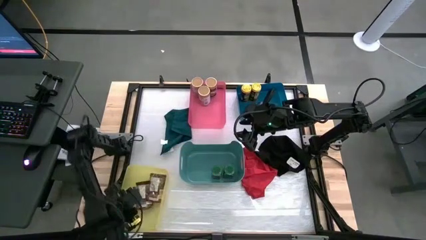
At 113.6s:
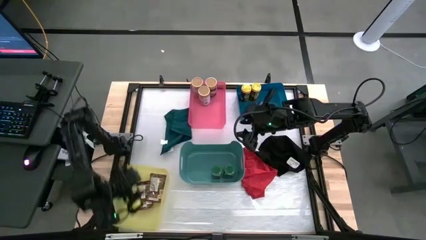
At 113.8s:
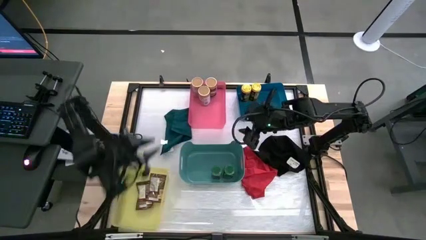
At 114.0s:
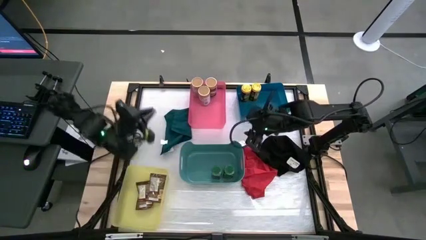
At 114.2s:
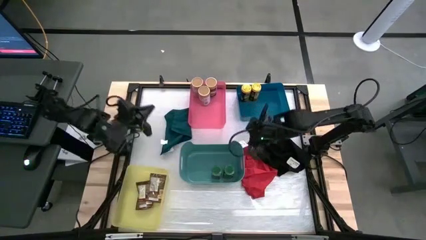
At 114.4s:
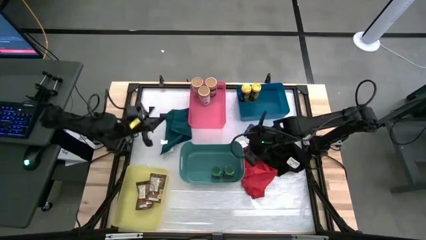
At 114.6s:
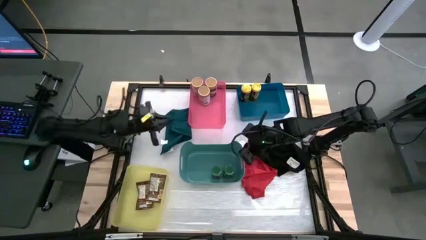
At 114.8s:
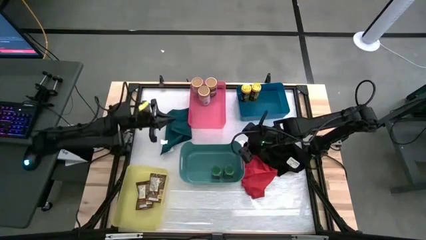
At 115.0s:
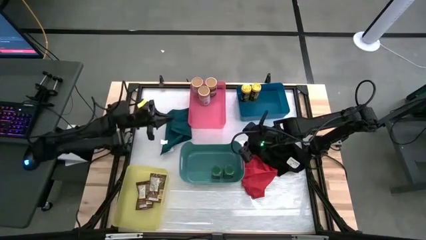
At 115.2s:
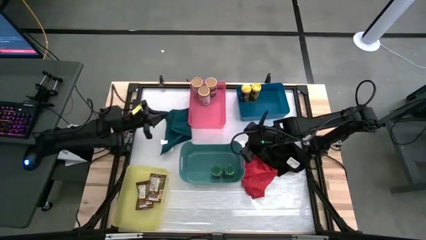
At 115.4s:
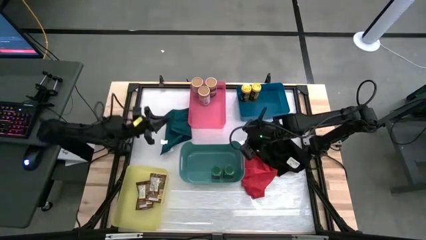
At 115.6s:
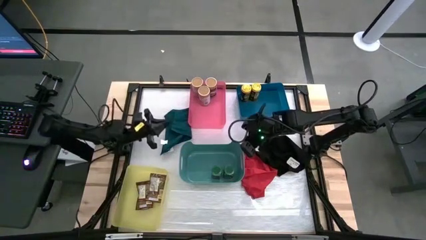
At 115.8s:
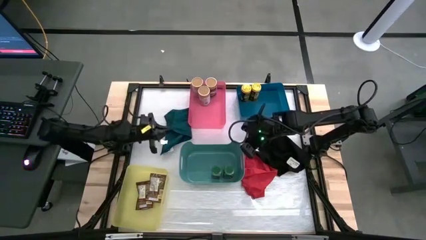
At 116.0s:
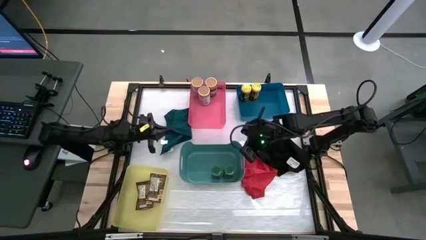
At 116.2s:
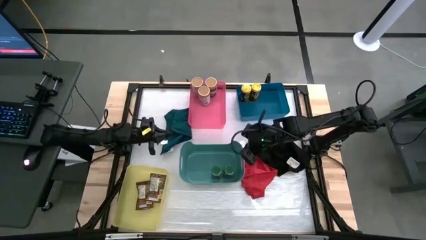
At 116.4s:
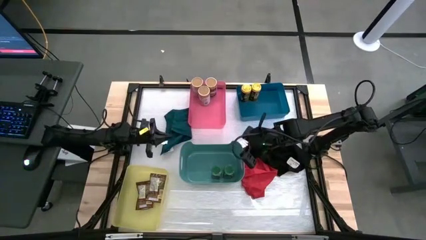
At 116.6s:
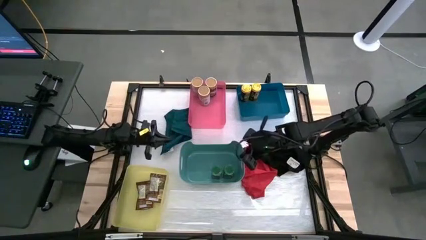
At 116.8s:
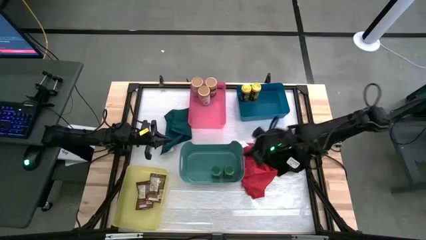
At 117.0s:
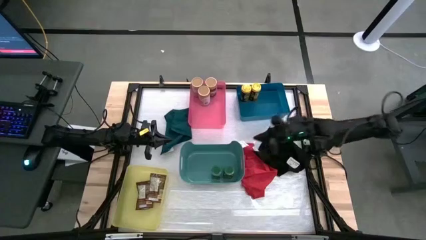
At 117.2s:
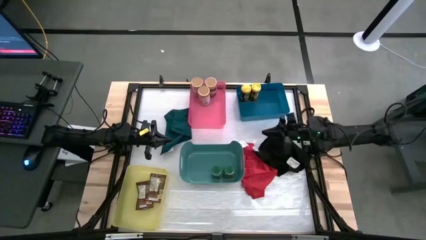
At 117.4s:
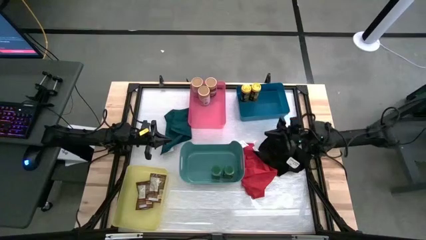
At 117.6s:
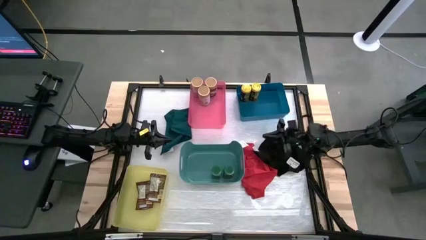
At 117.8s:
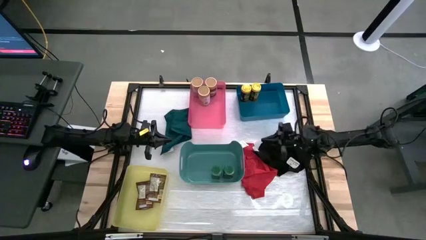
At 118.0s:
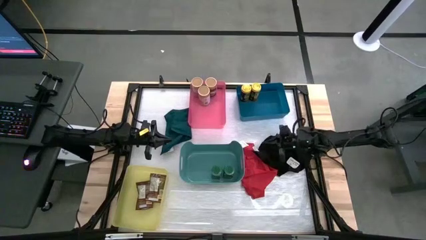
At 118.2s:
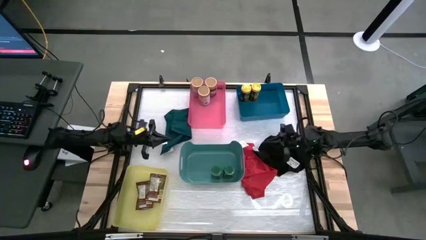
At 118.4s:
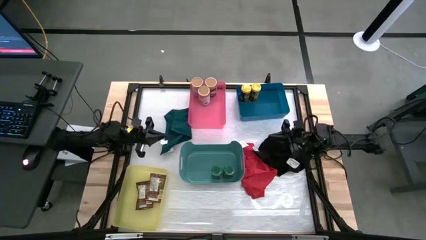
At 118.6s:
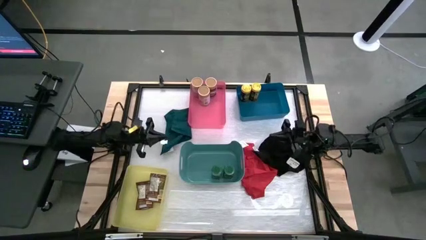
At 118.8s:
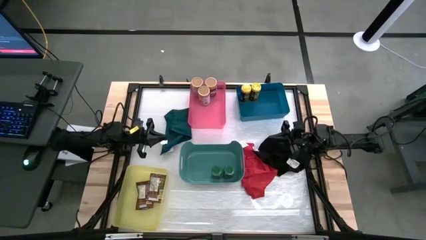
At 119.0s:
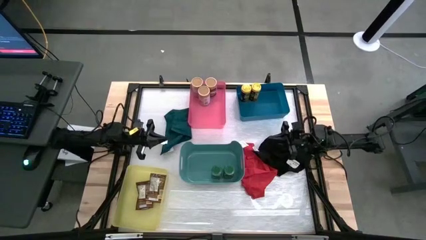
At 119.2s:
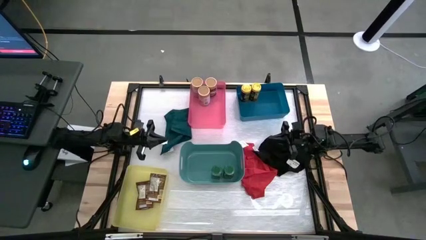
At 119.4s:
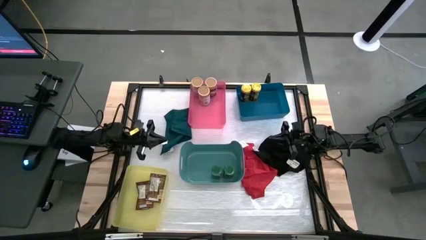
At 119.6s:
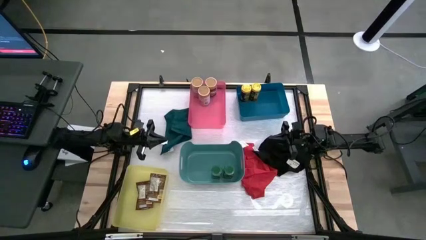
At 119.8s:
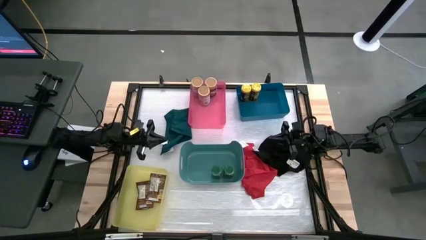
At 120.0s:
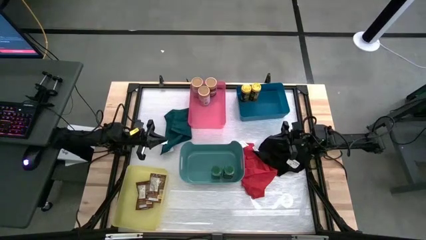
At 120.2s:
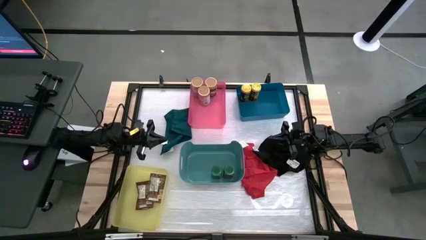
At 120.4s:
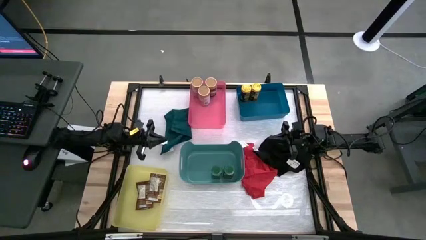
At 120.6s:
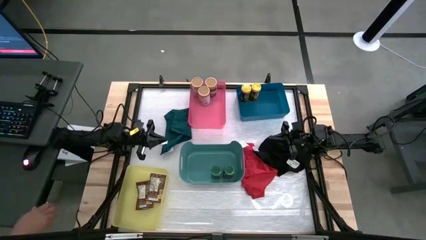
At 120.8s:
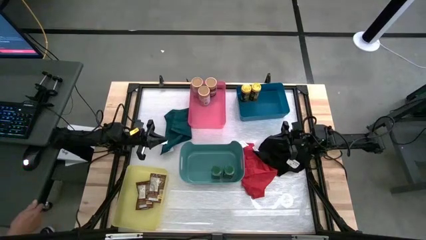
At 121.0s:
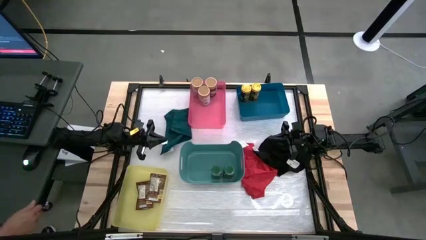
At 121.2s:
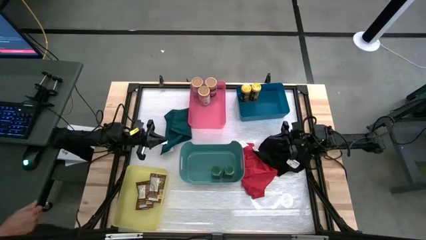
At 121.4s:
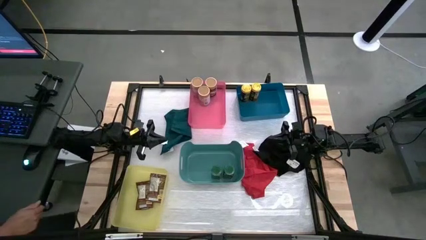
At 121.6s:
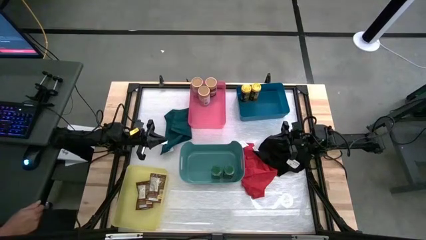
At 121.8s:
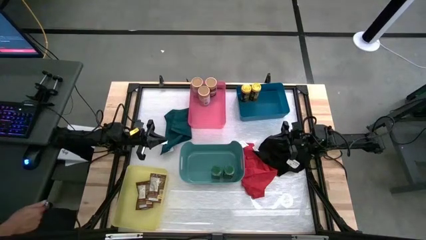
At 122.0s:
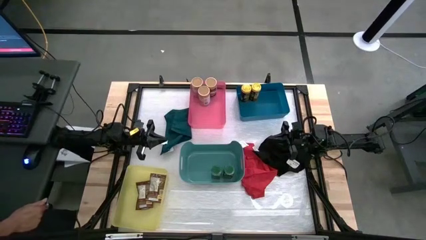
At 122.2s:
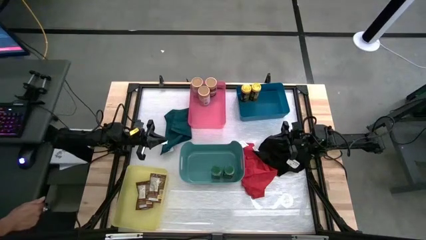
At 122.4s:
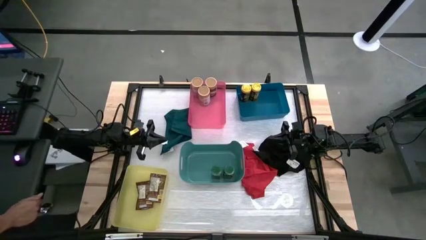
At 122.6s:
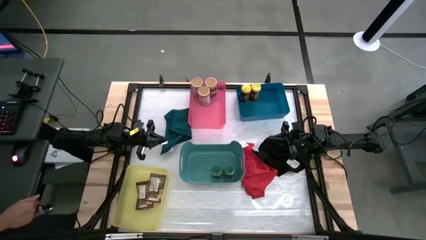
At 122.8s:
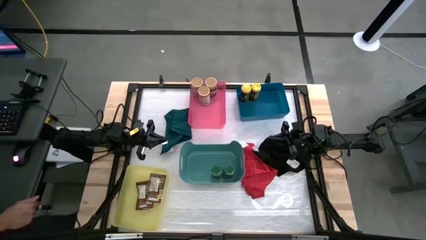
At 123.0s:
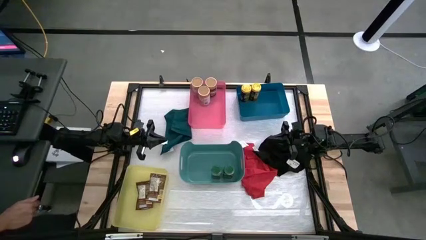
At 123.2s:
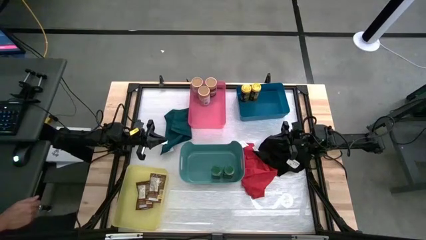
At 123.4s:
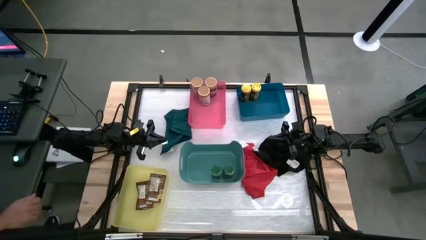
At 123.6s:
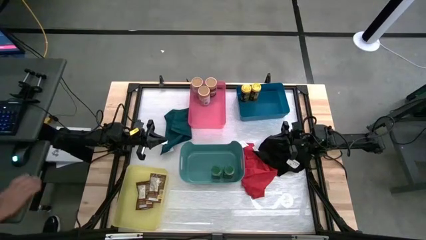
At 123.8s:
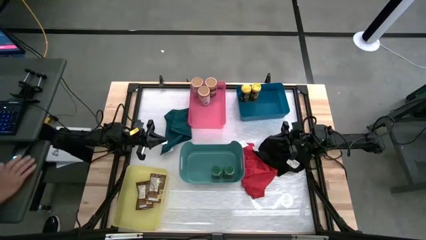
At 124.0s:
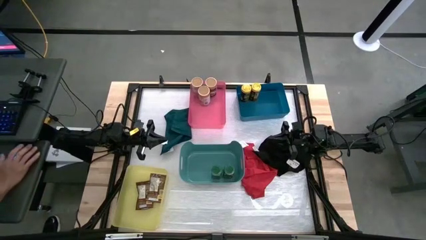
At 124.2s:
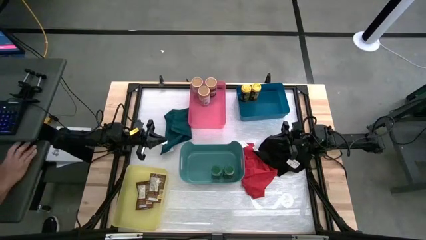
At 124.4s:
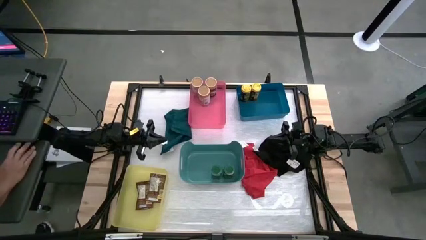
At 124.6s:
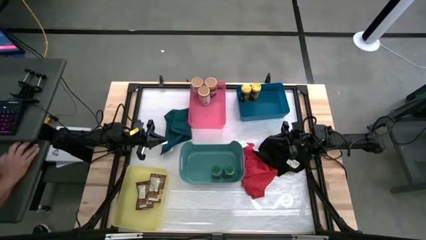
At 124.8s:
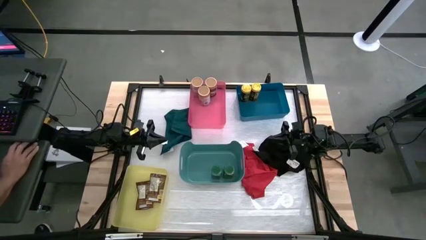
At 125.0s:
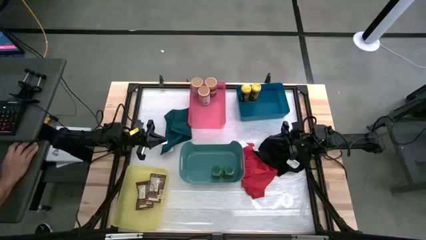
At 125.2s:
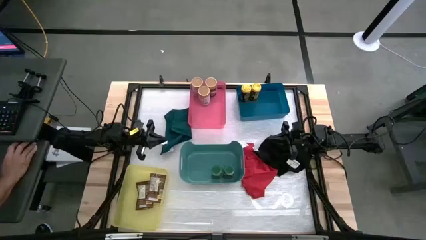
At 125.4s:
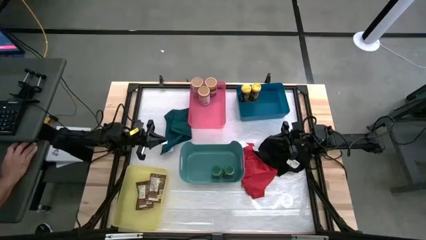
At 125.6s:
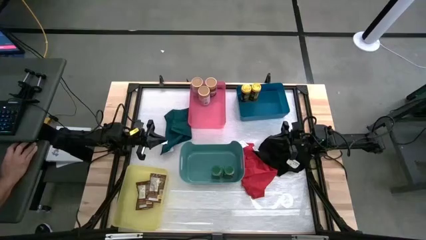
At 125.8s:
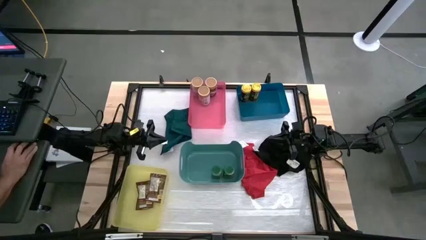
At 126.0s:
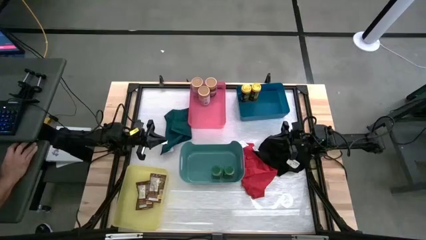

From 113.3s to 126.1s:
Task: Sort spices by type
Return to Home Position

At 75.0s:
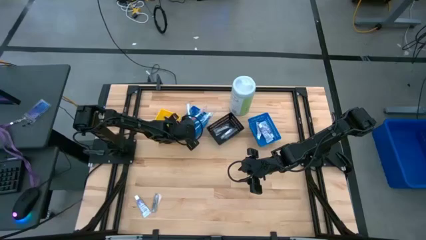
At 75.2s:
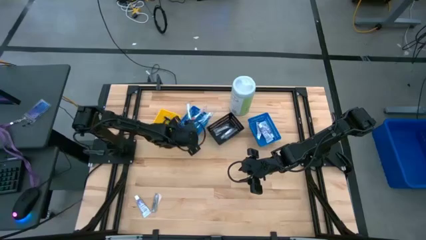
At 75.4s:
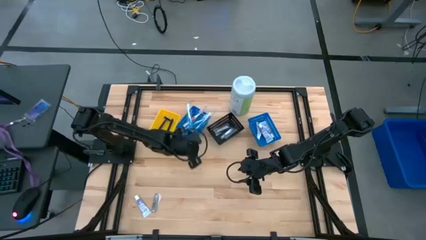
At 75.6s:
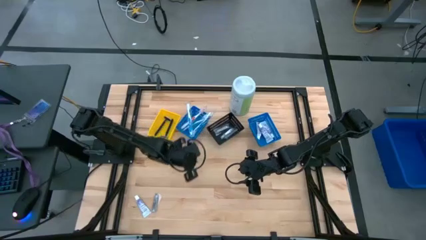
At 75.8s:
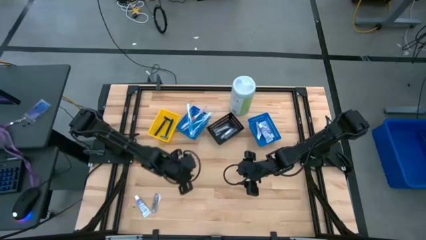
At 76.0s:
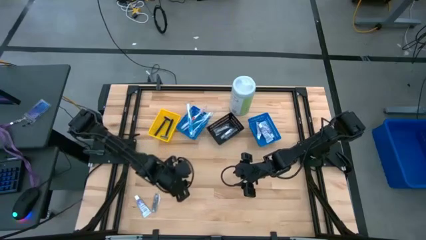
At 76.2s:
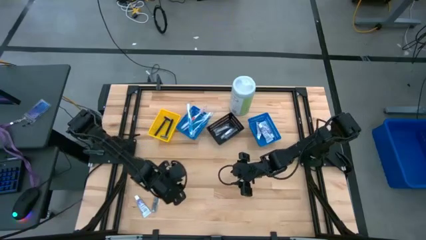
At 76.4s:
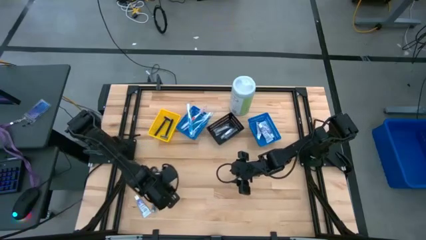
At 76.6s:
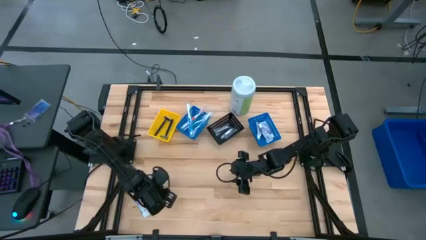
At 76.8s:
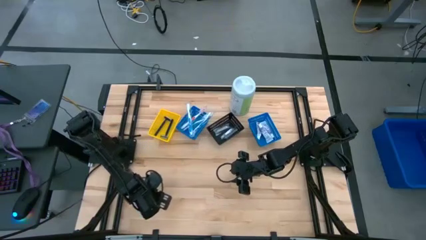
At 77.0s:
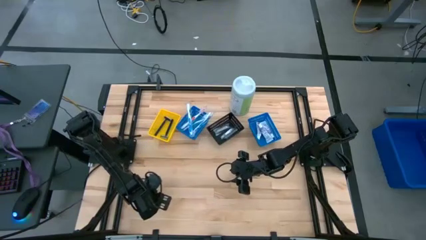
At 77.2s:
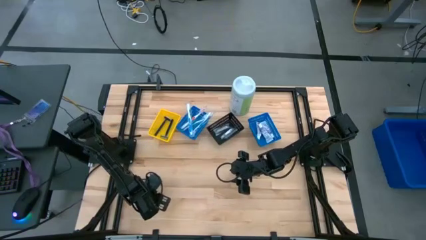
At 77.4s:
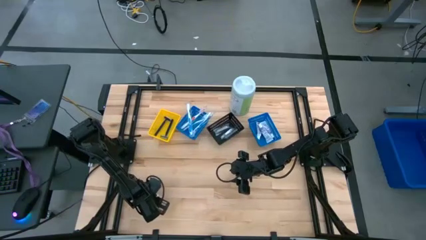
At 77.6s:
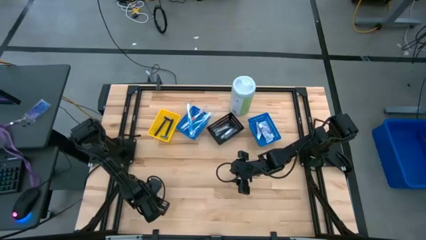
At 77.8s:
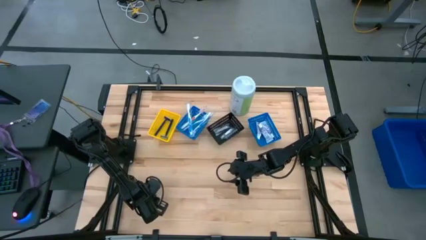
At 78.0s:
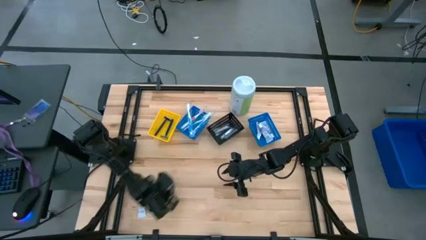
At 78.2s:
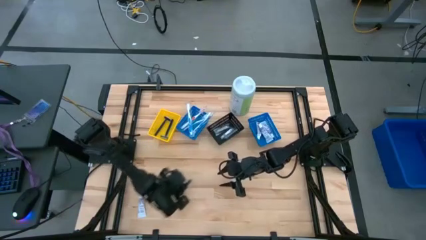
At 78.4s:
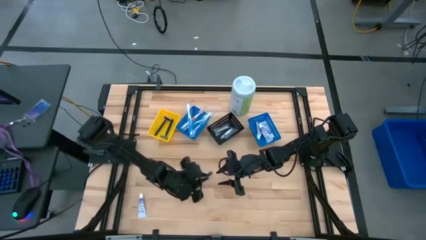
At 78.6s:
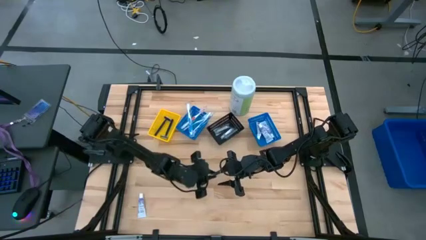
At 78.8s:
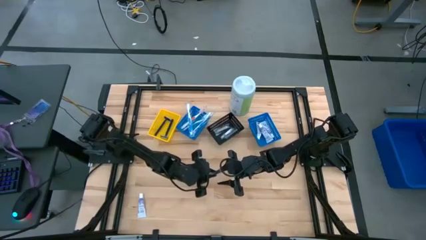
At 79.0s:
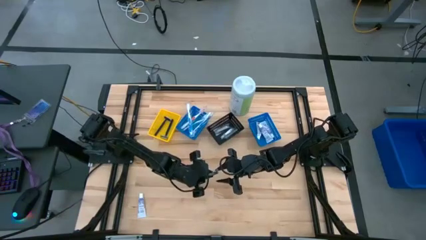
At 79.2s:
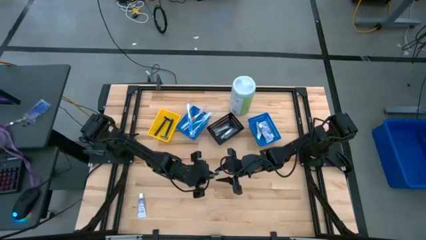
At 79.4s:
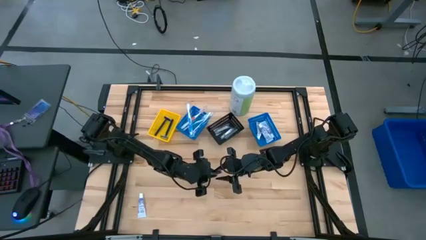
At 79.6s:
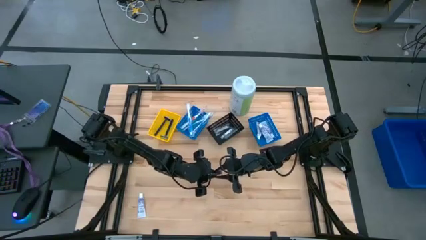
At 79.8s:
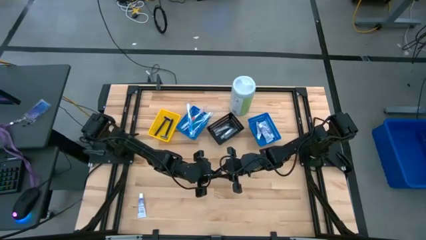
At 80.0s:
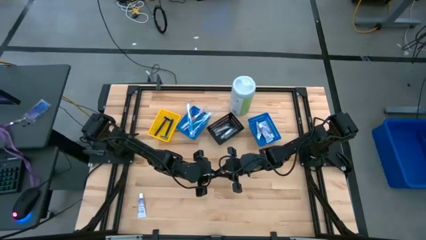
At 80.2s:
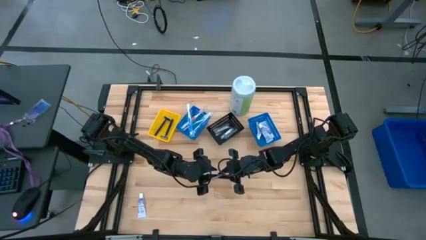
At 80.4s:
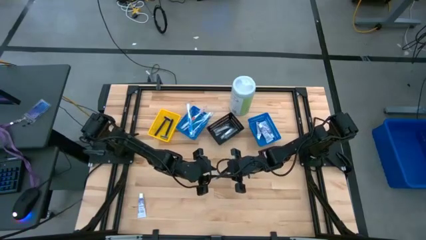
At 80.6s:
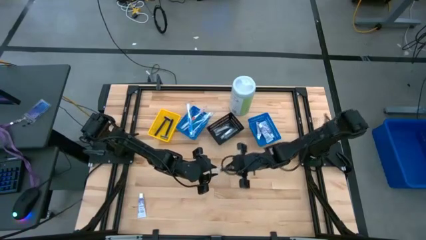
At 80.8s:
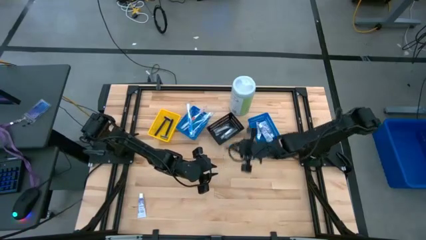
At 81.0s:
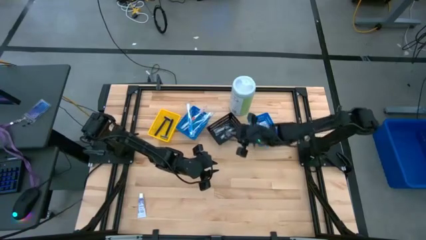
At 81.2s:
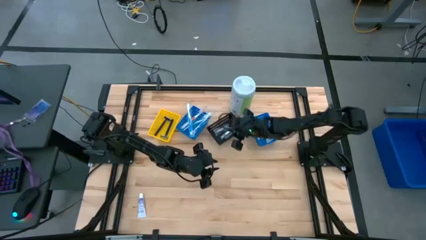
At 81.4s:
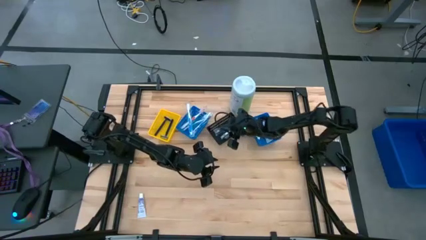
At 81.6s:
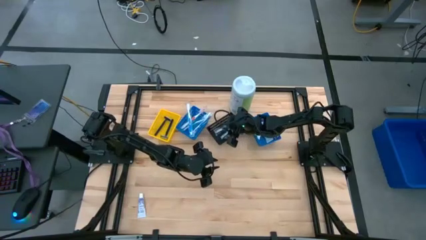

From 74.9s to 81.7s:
Task: Pick & Place Travel size toiletries
Put the silver nail cutter into the black basket
